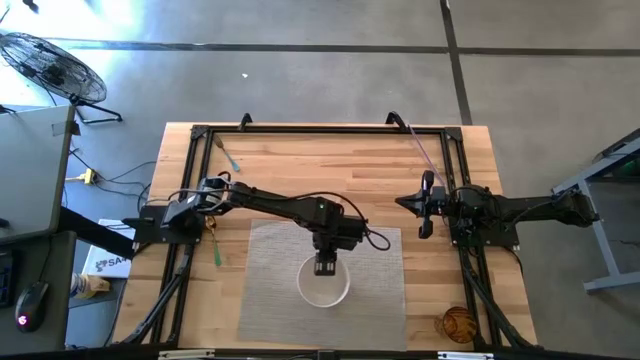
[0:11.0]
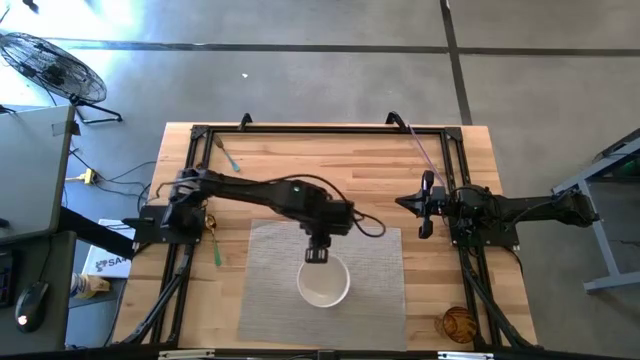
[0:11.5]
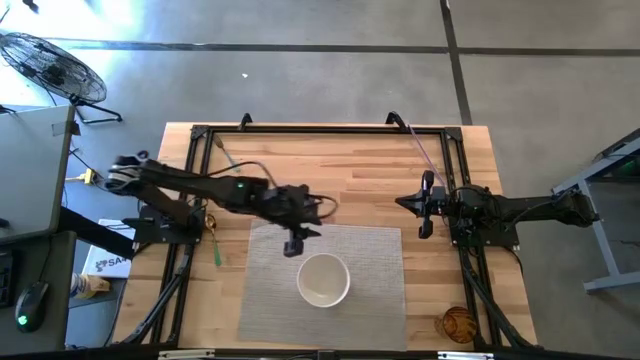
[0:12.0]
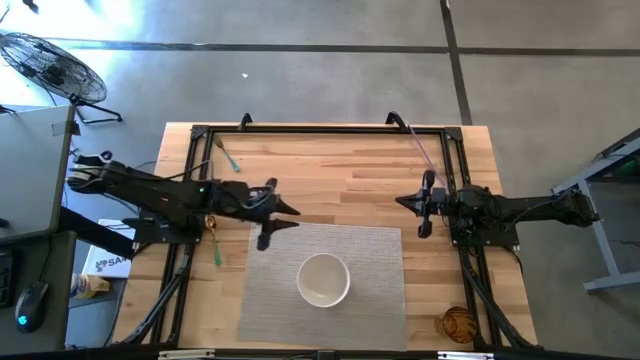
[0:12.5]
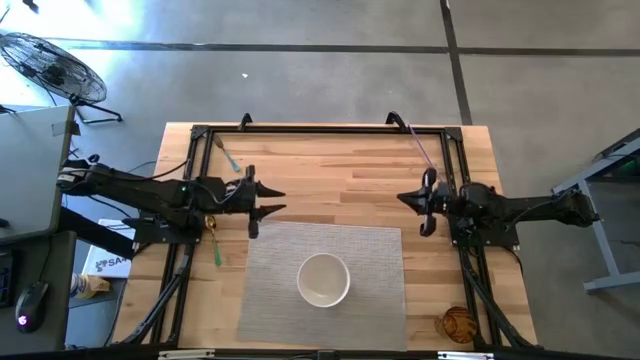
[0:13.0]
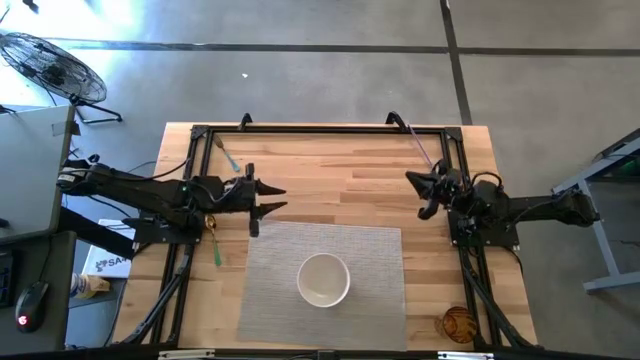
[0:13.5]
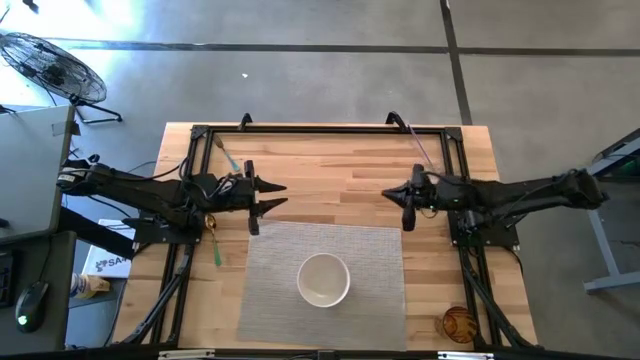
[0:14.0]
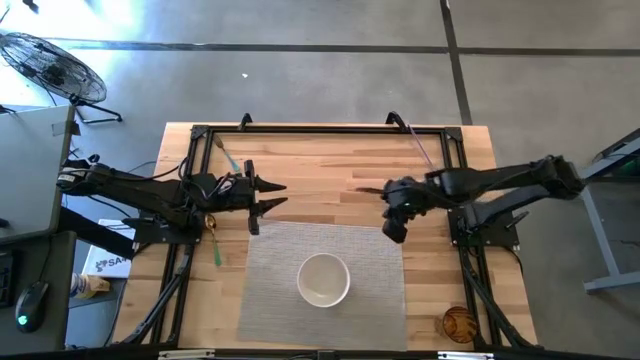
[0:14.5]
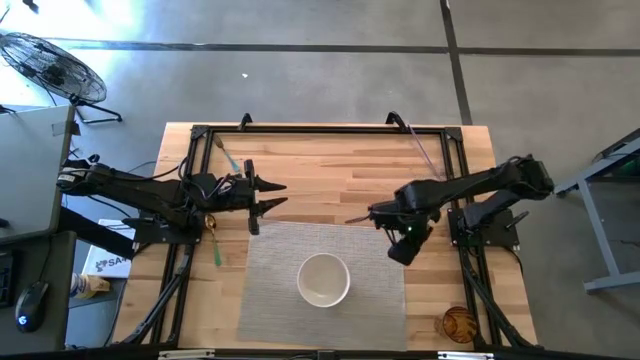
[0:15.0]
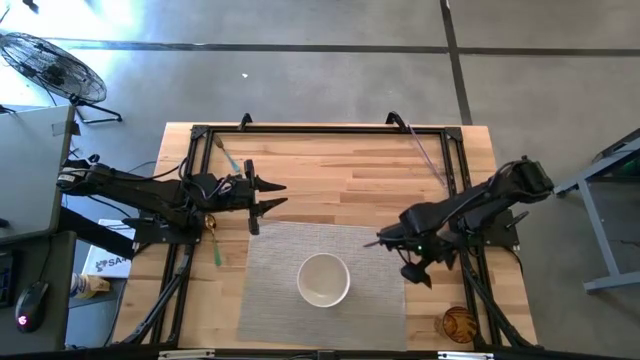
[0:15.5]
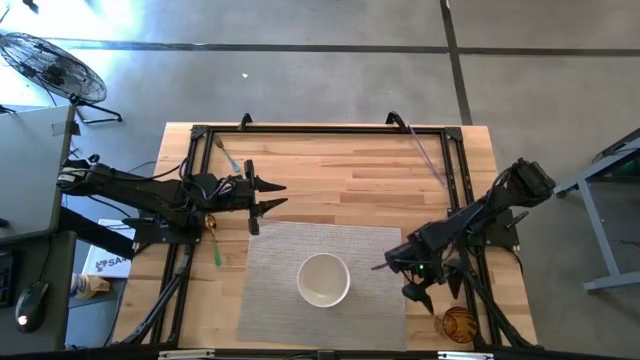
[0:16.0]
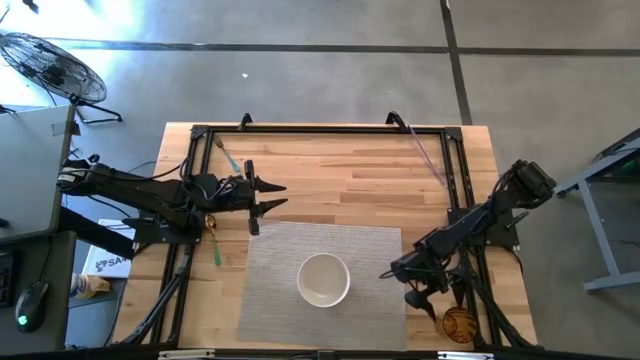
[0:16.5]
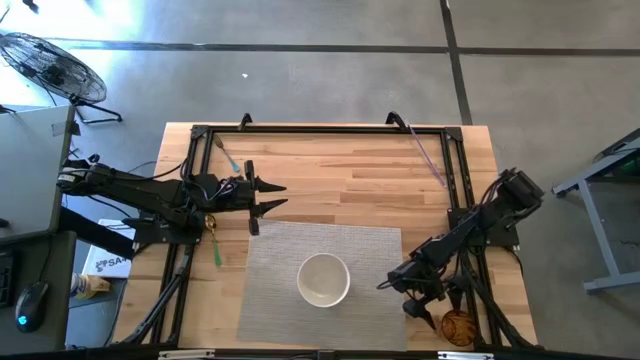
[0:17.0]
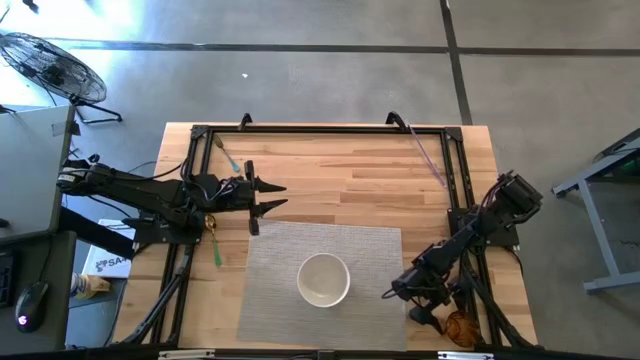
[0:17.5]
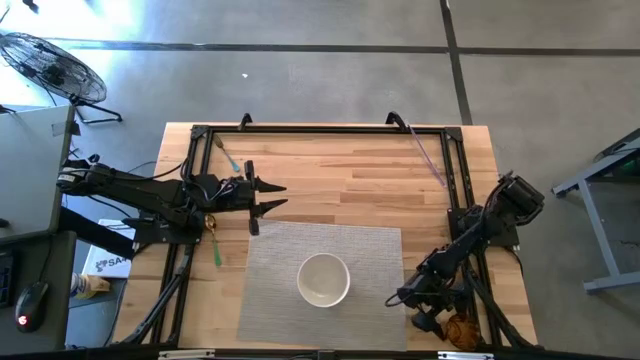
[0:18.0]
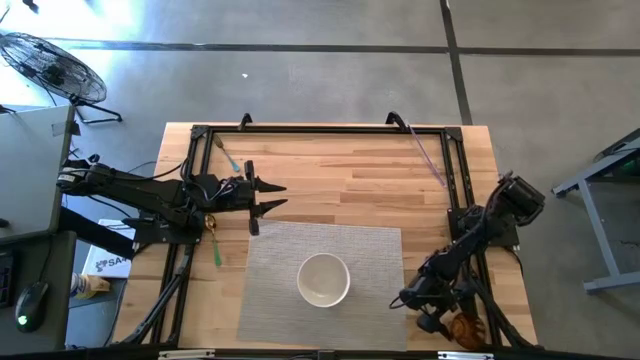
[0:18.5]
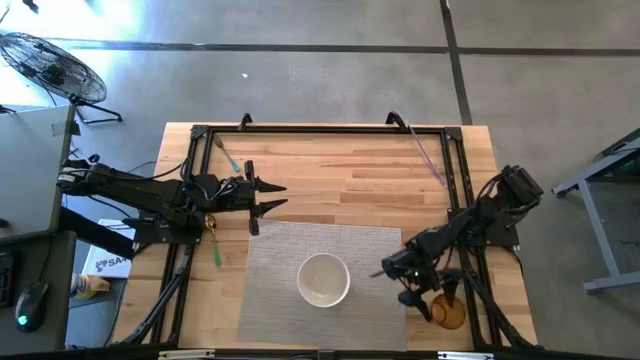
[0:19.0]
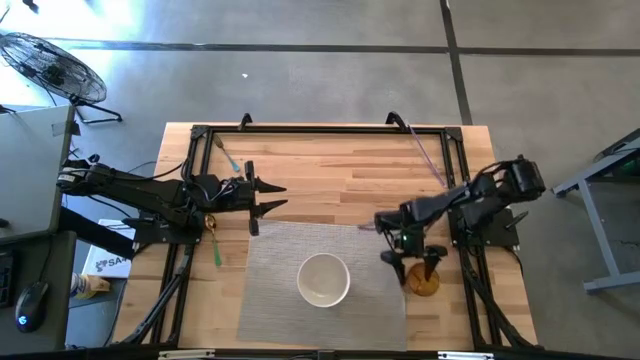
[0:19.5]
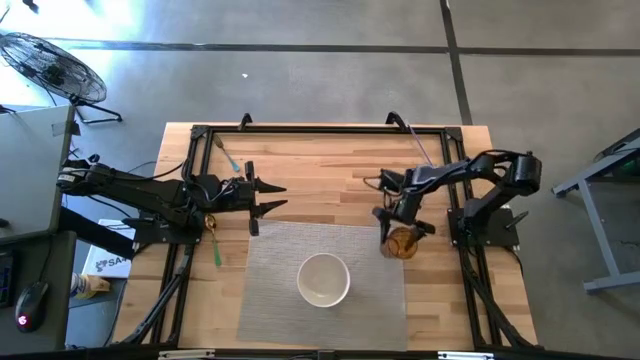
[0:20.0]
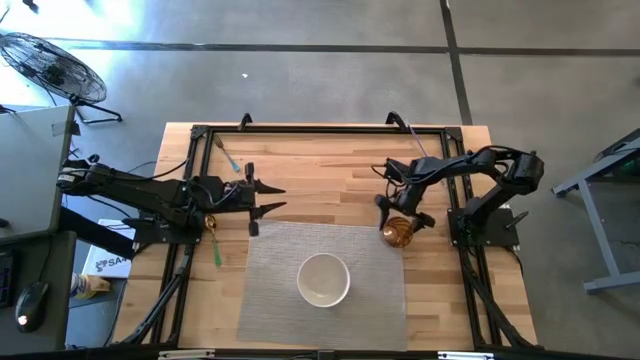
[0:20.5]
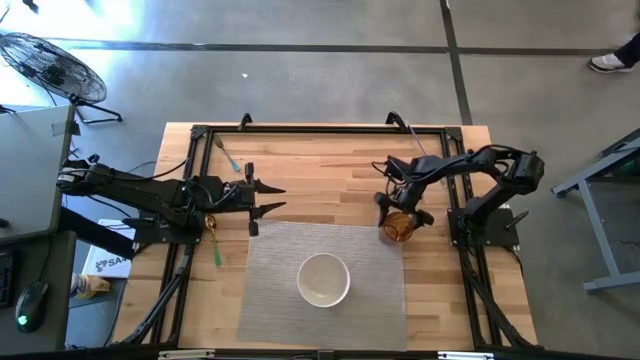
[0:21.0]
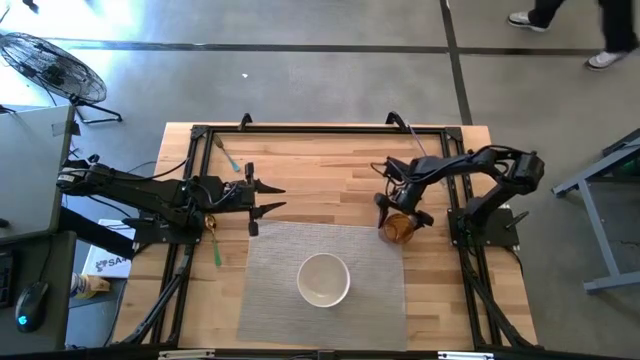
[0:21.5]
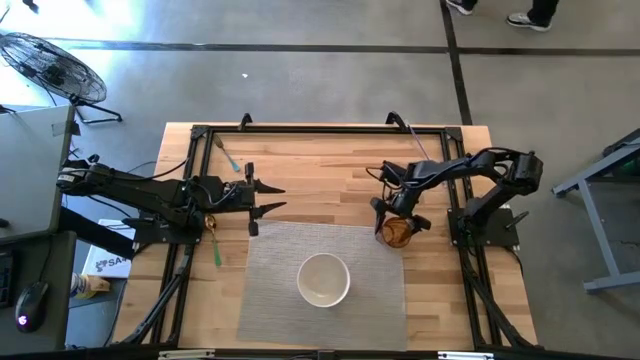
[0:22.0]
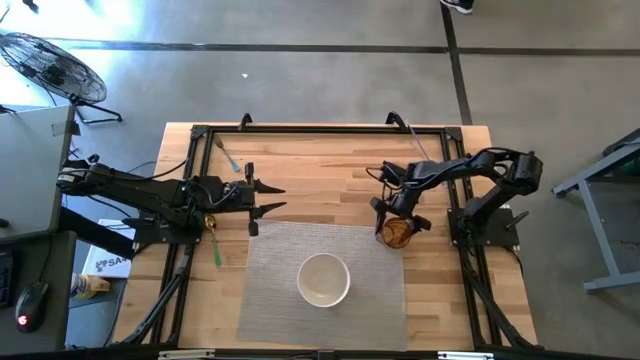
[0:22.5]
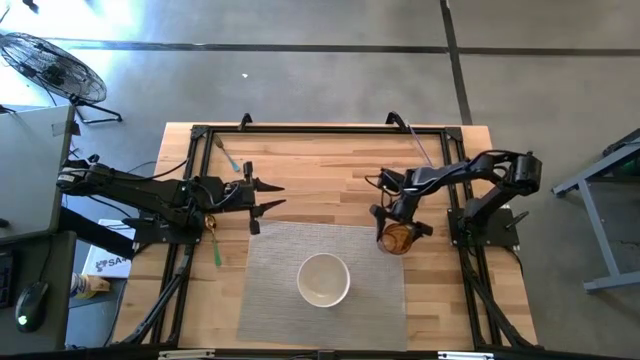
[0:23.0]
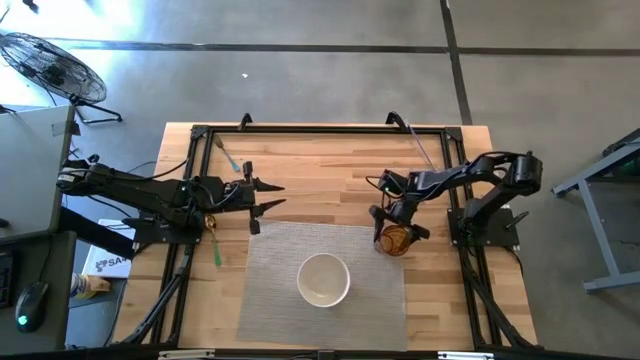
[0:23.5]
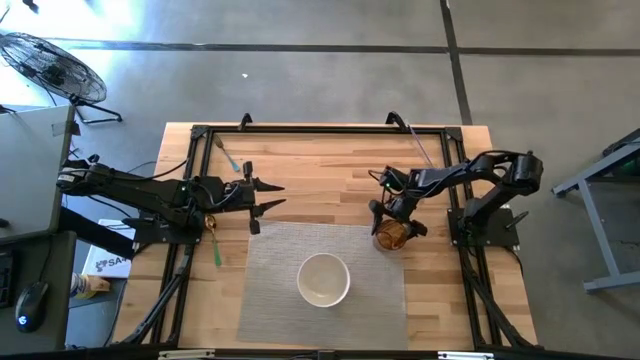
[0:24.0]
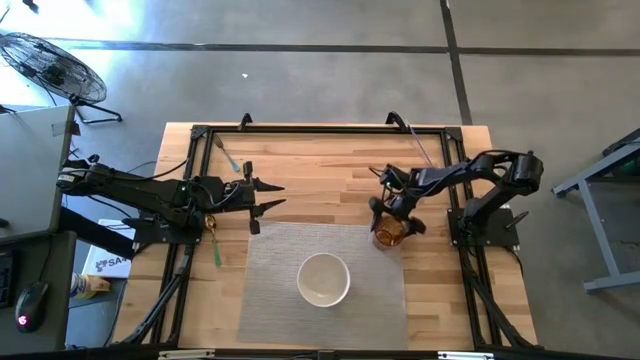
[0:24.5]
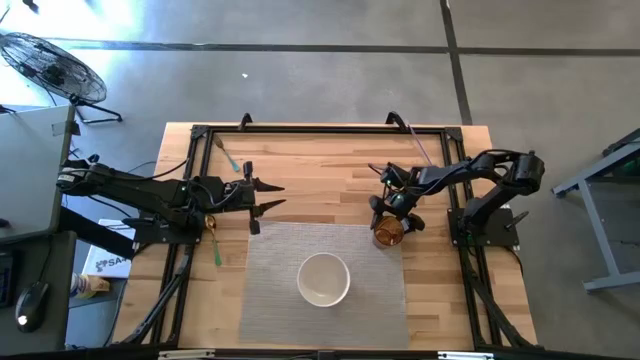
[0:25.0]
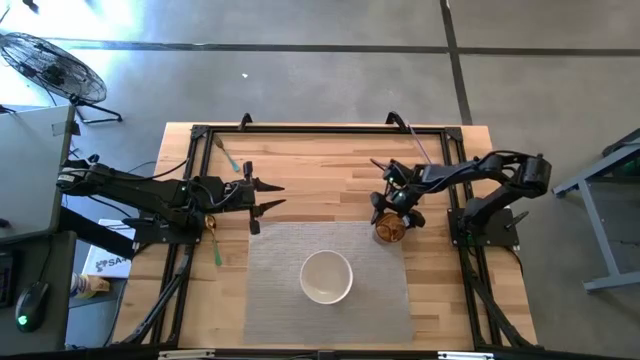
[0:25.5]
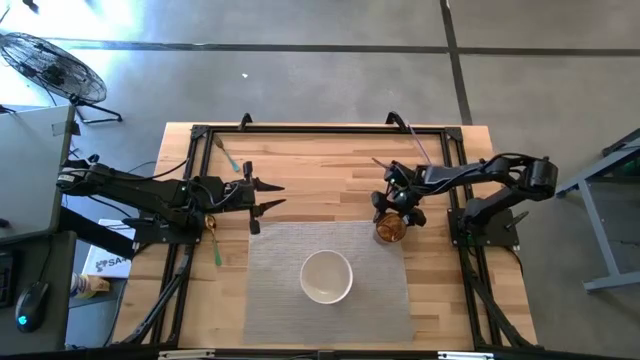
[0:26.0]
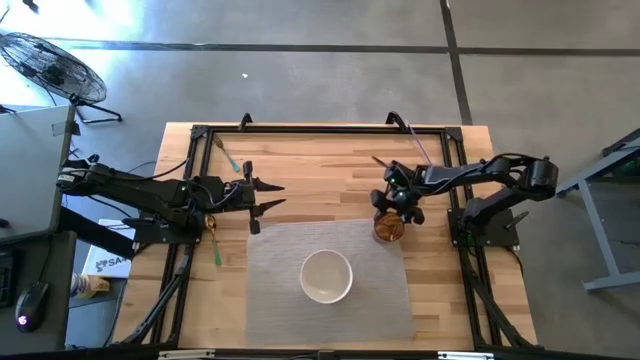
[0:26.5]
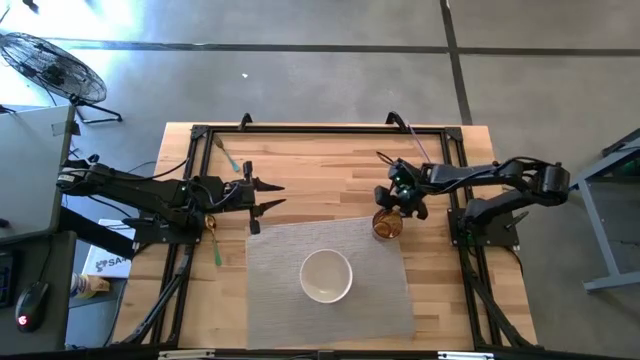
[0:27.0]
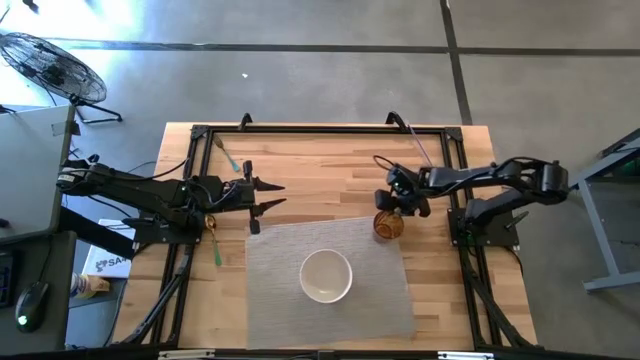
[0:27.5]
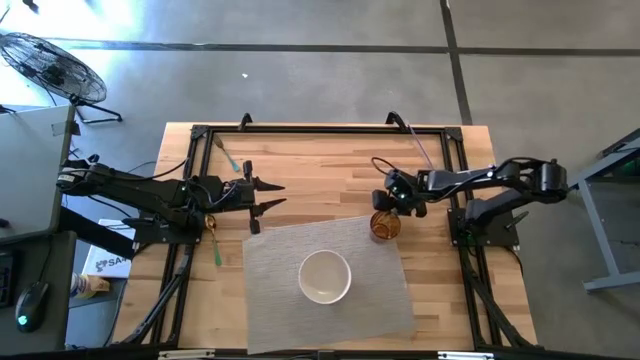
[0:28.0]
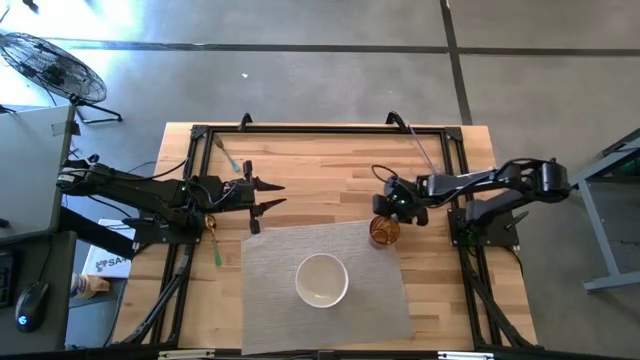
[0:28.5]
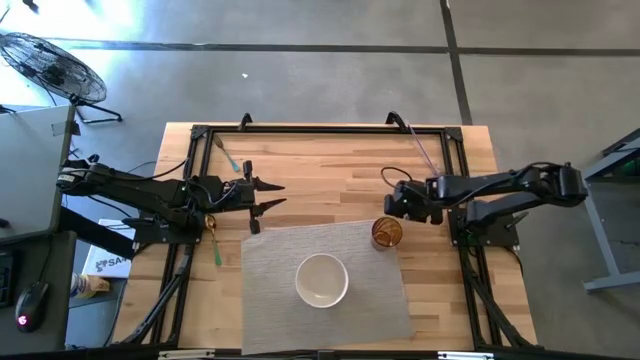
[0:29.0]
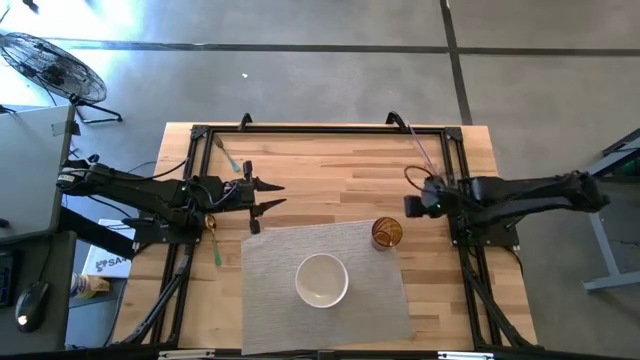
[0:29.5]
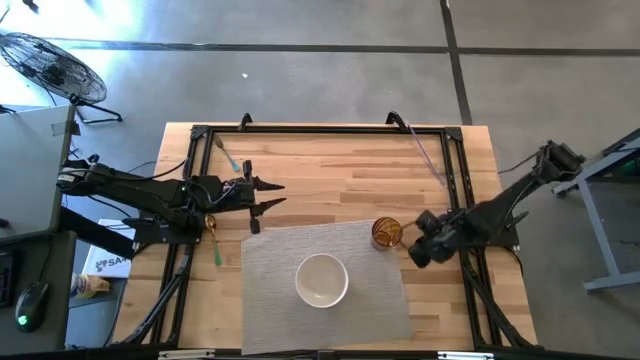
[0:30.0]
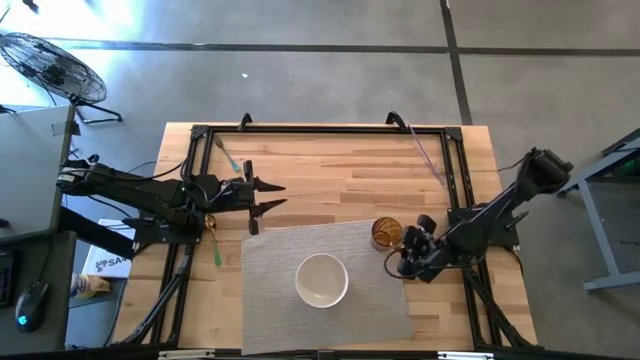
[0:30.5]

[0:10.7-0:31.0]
Task: Pick & Place Utensil
Put the brown cup to the top right on the gray mat
